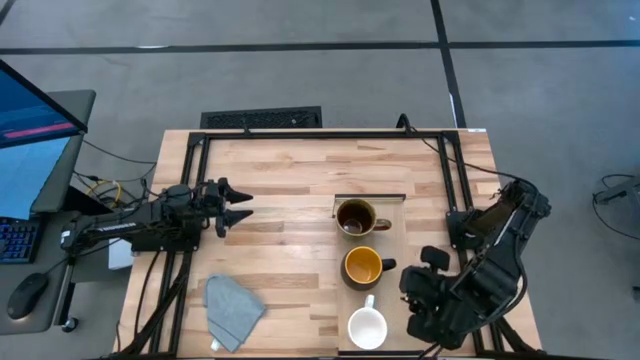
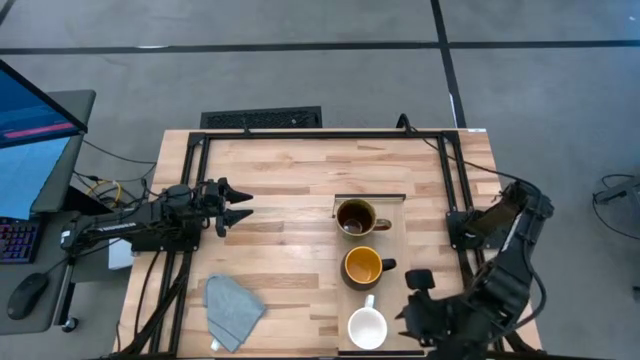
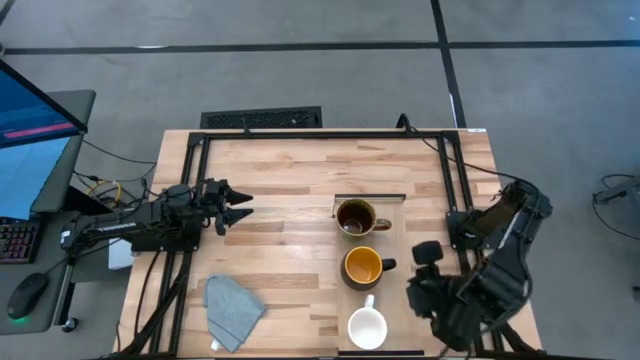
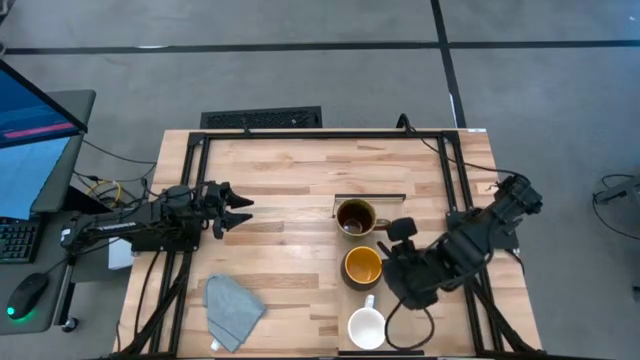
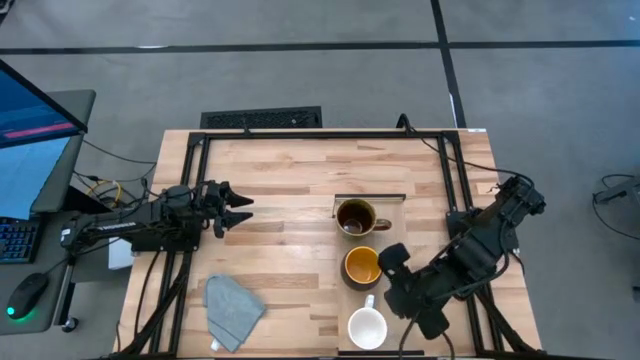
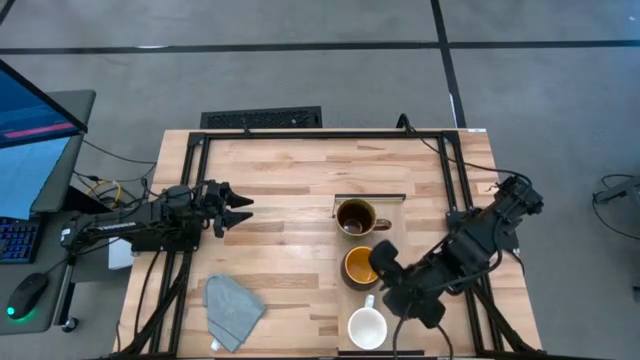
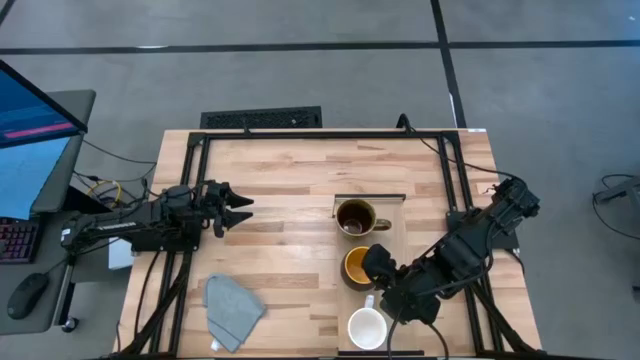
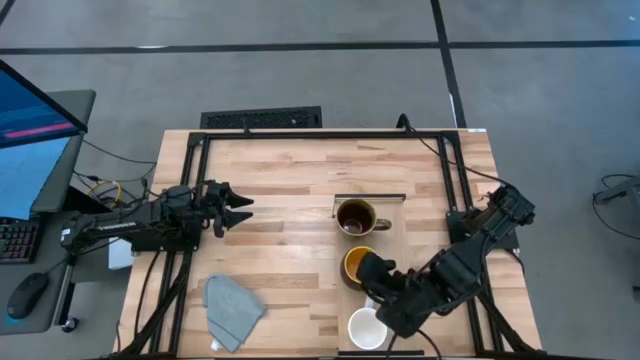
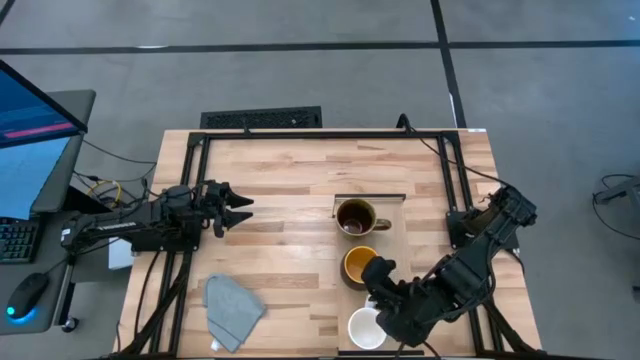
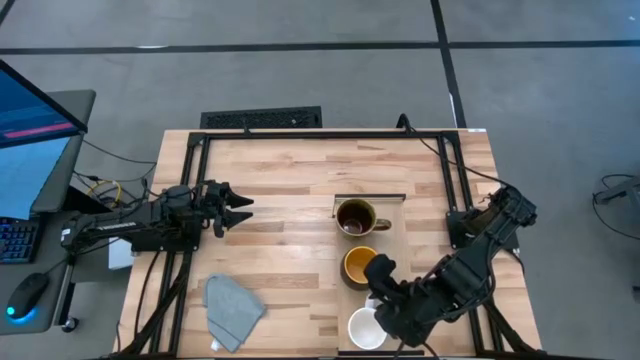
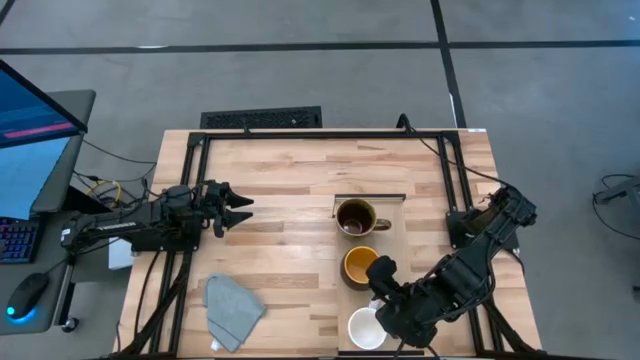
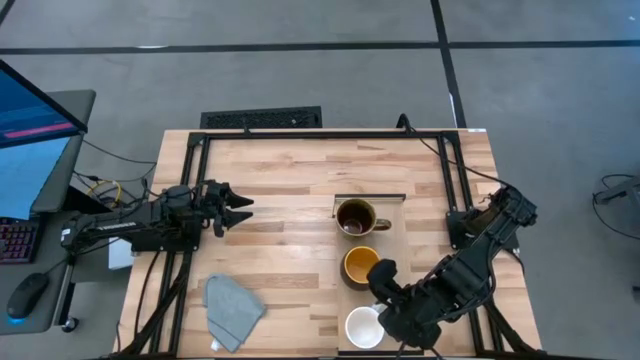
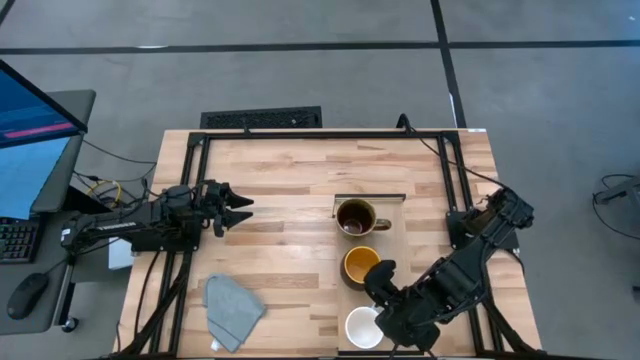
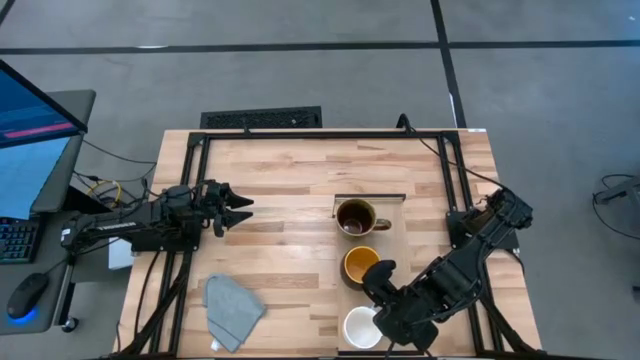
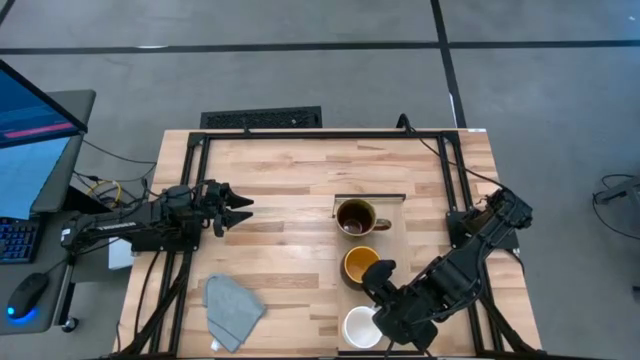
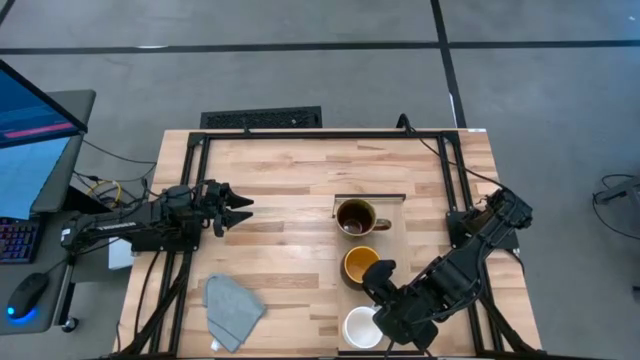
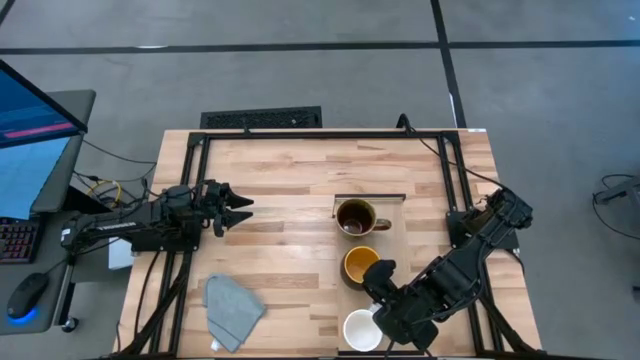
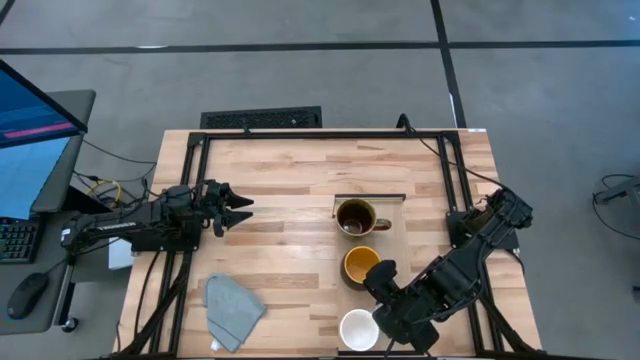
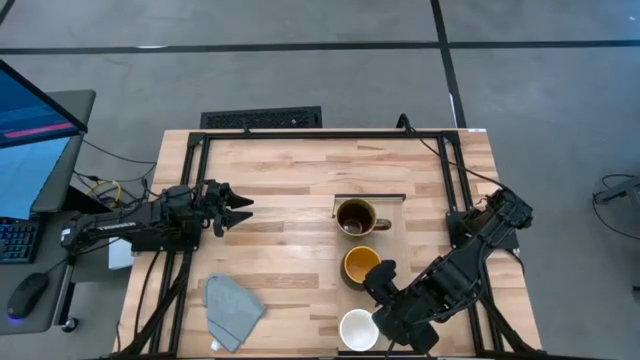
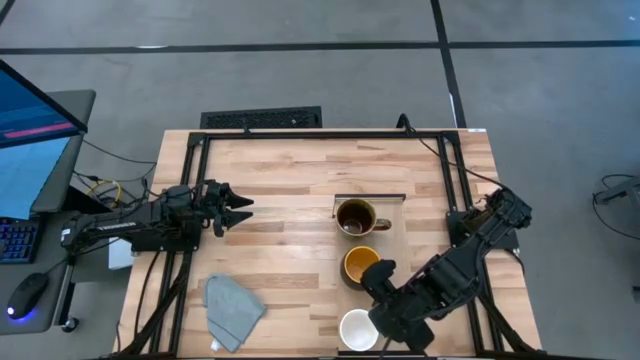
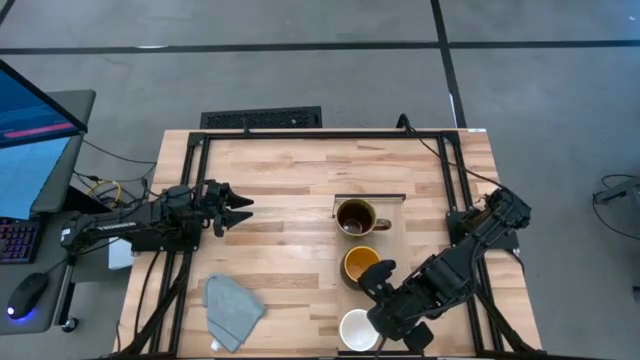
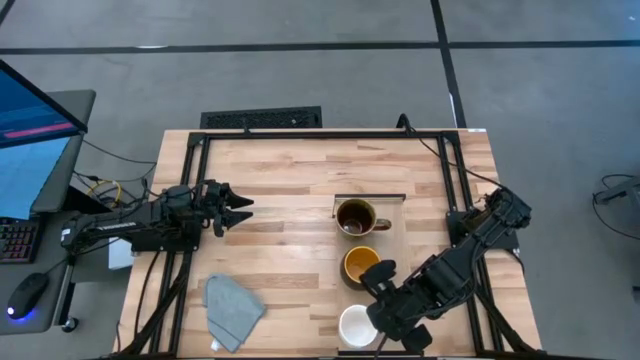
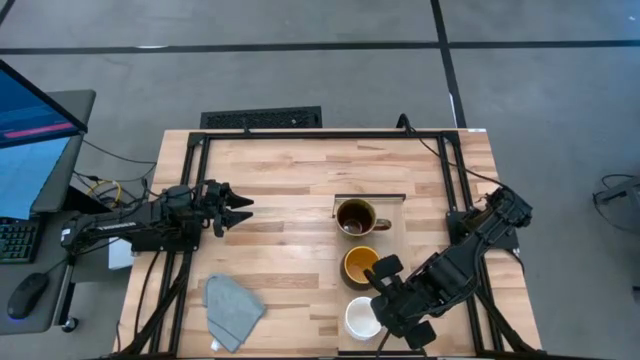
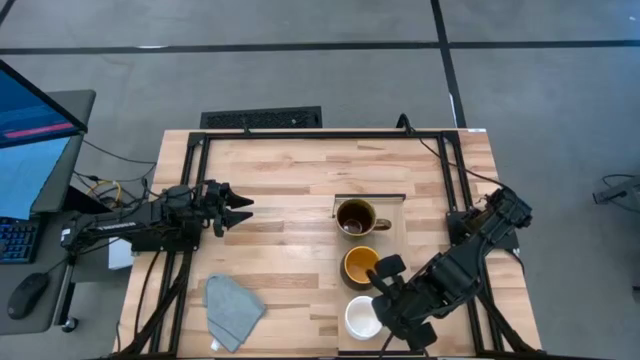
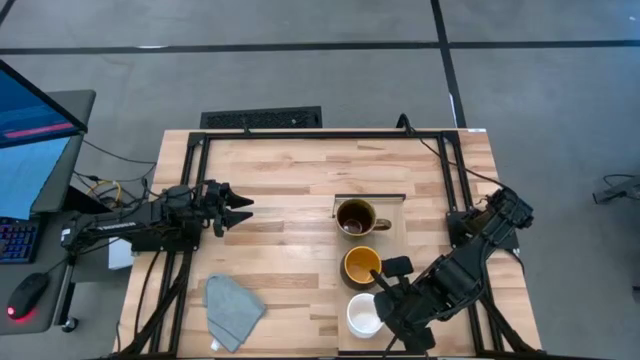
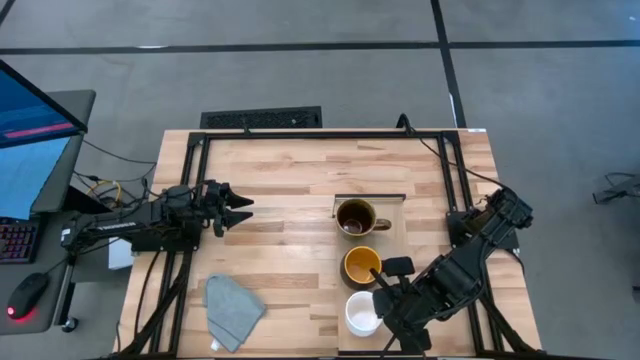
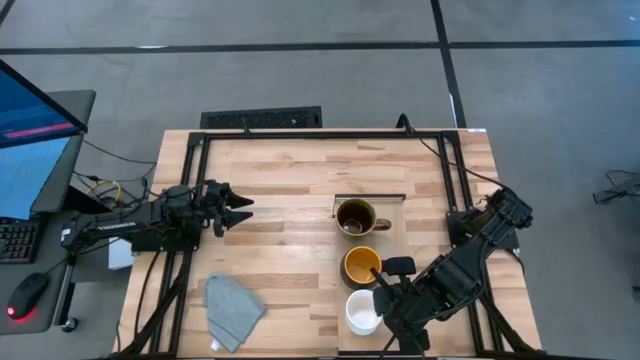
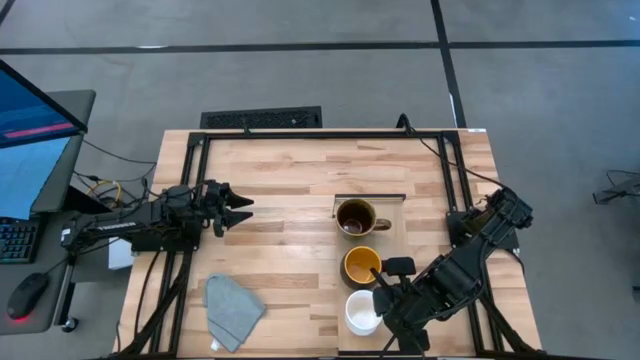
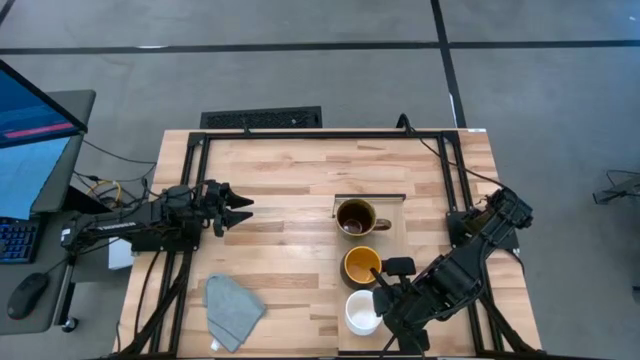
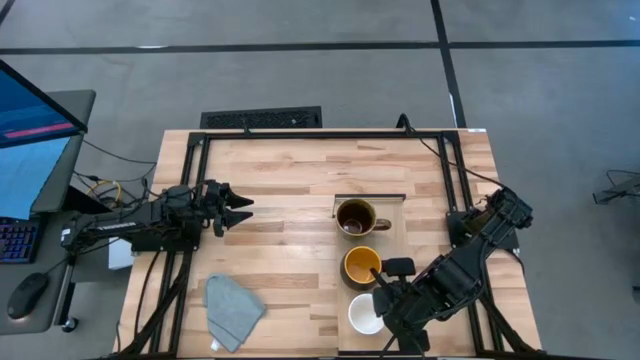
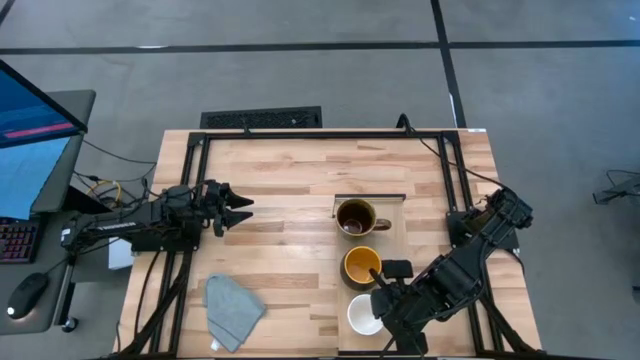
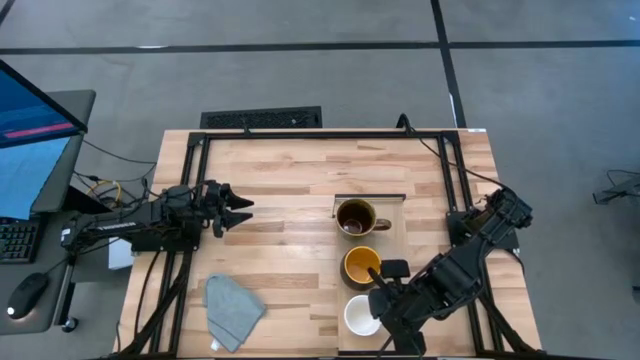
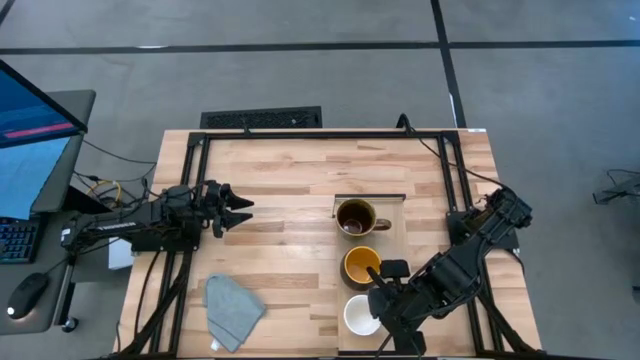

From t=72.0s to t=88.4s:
Task: Stack small to large cups/mugs on shelf
Put the white mug on the shelf

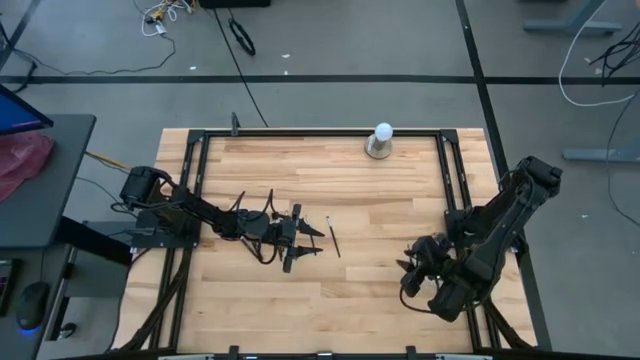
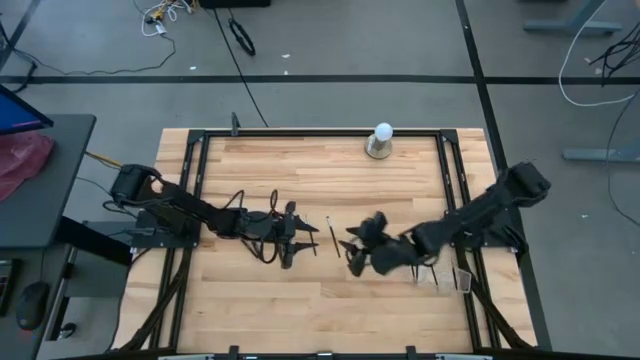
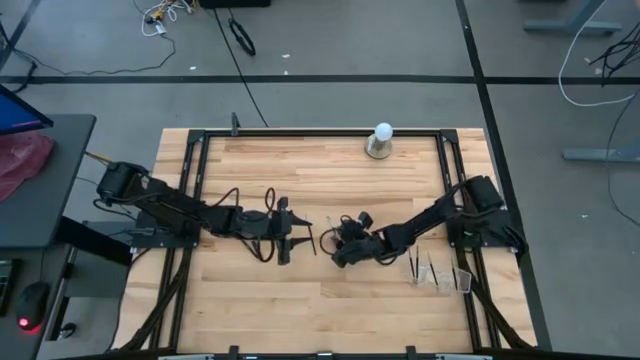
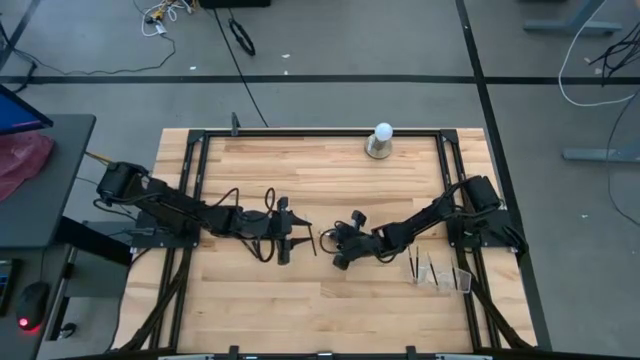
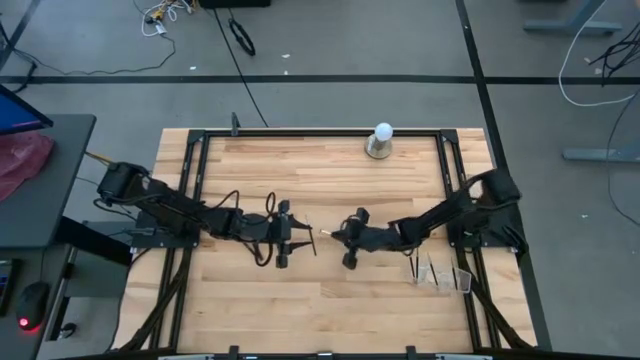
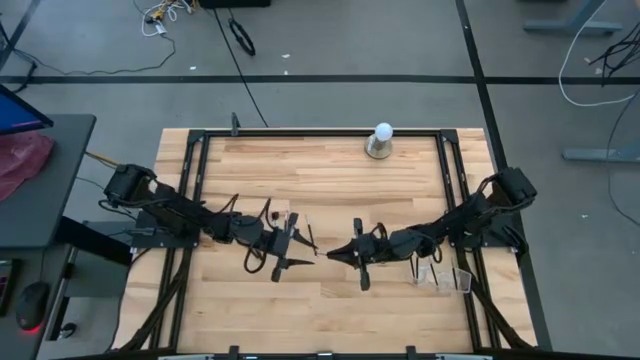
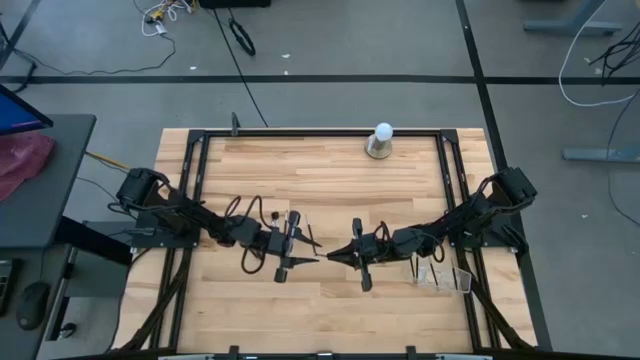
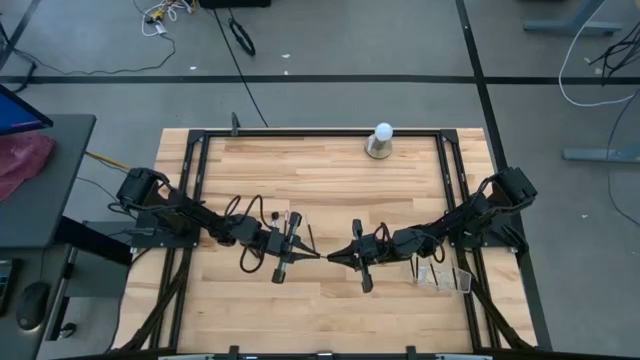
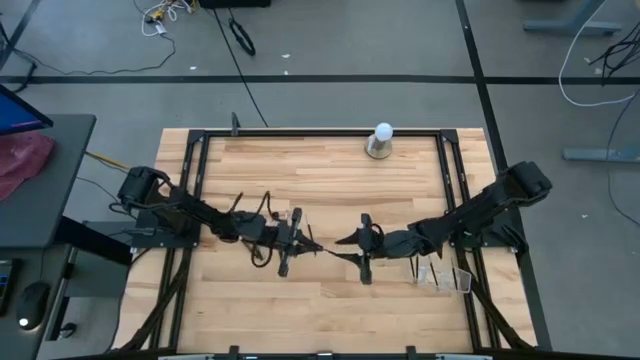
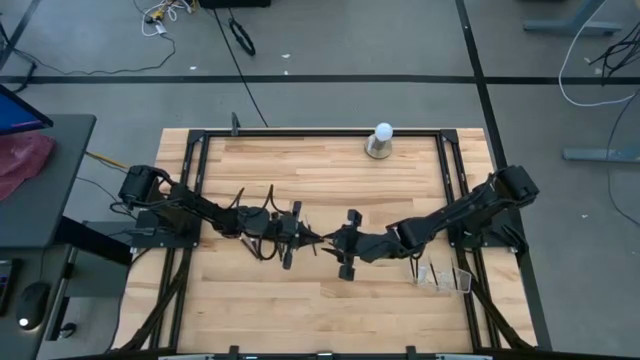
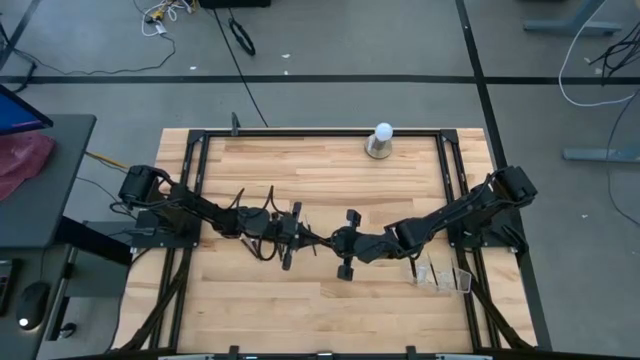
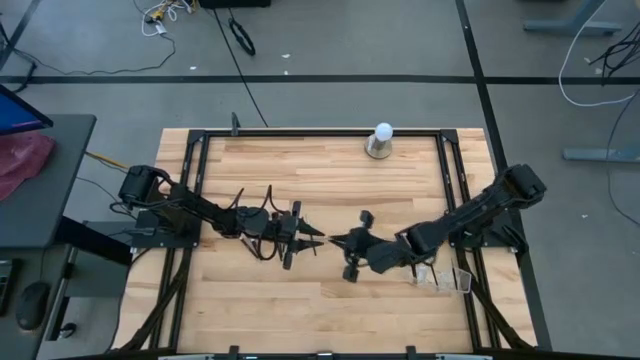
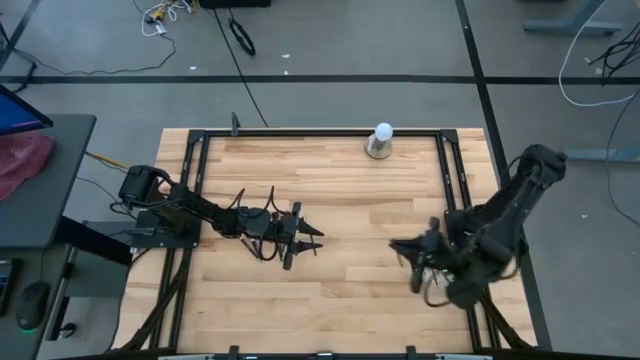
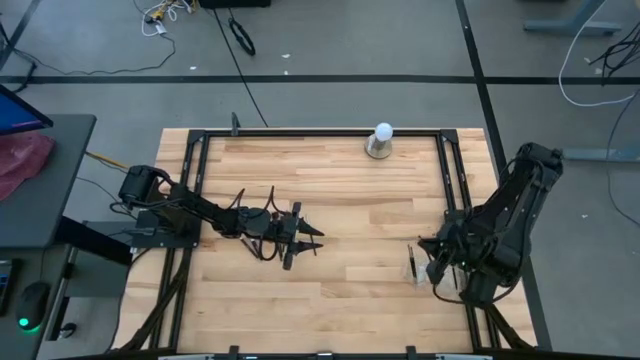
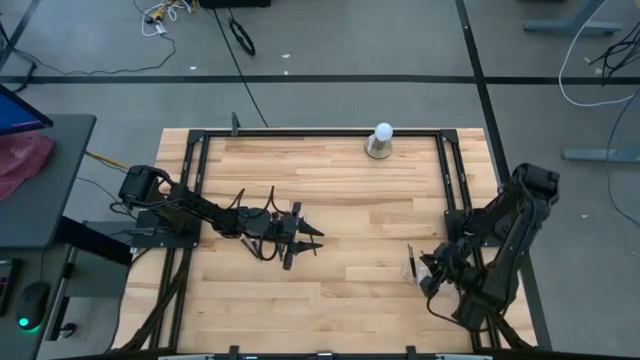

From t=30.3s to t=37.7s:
Task: Put items in baskets/containers
Put the black eyeshadow brush into the transparent organizer
